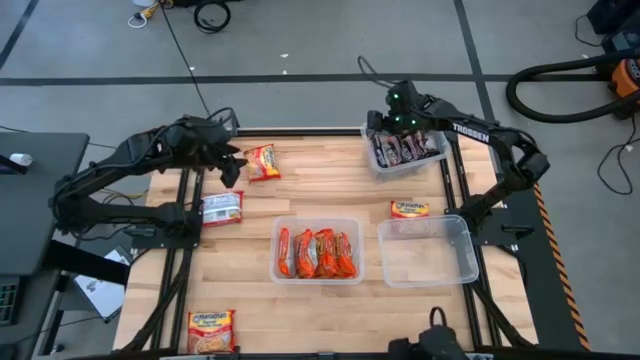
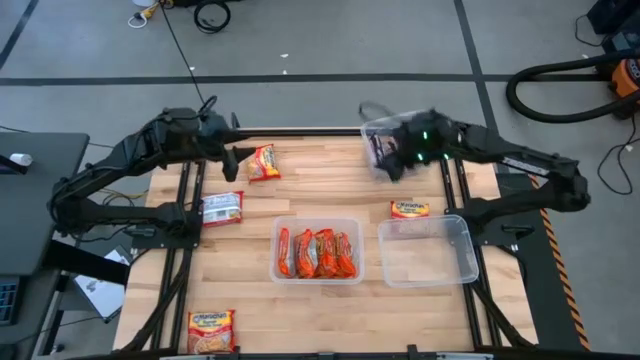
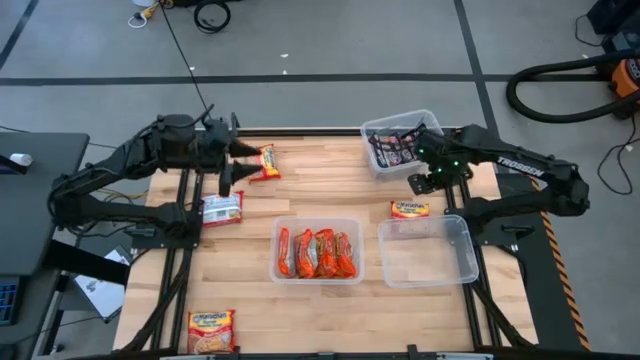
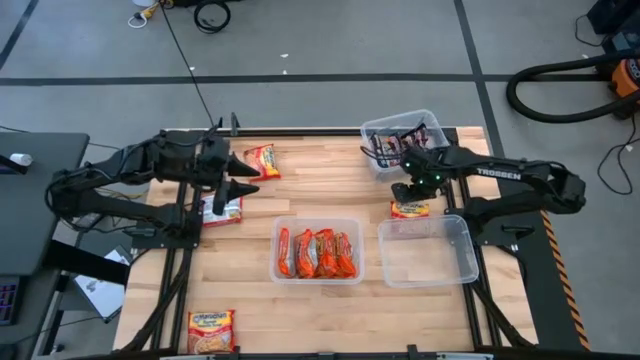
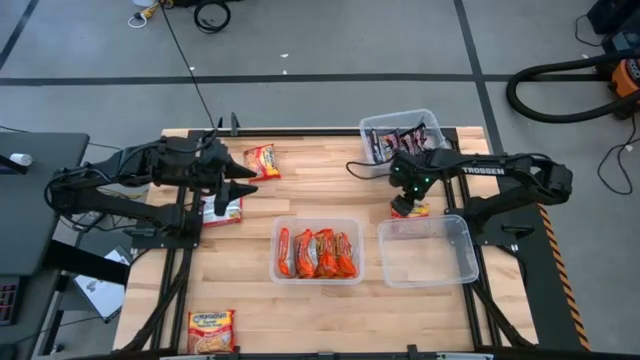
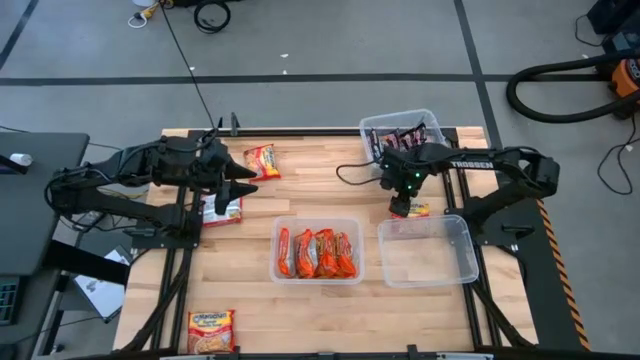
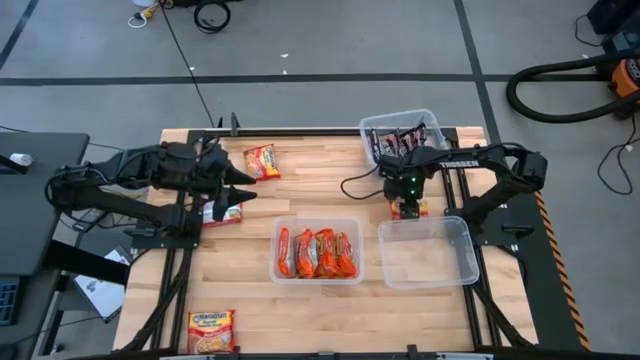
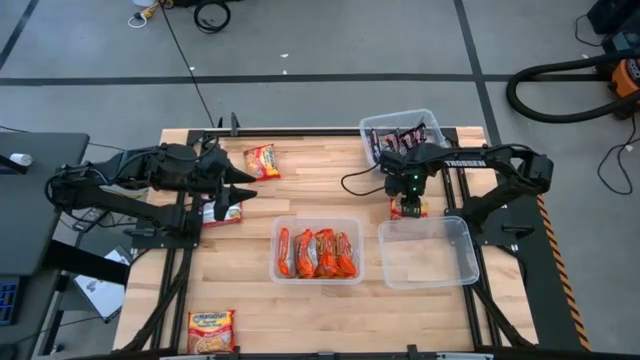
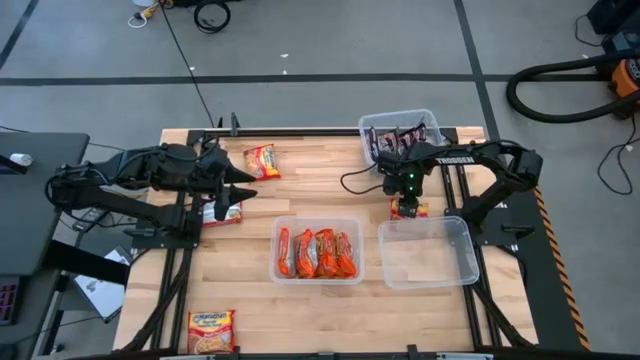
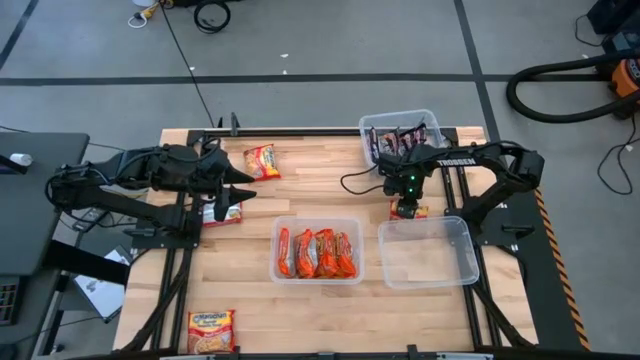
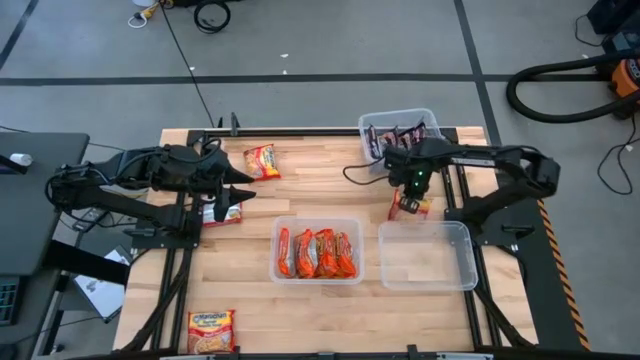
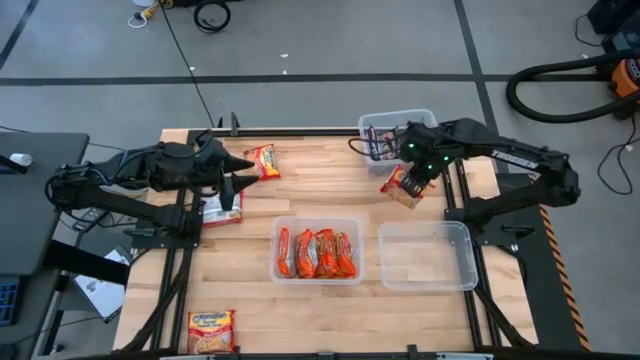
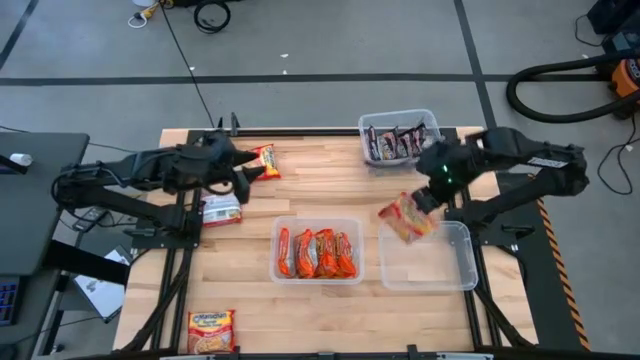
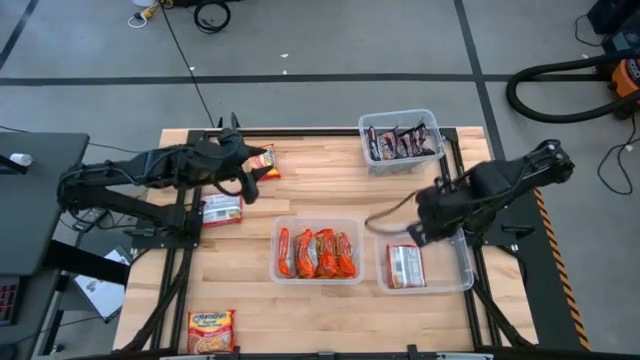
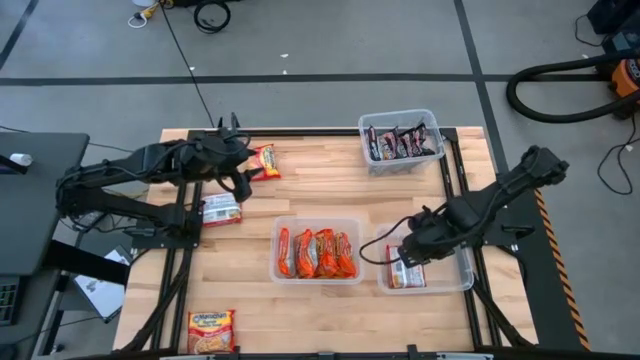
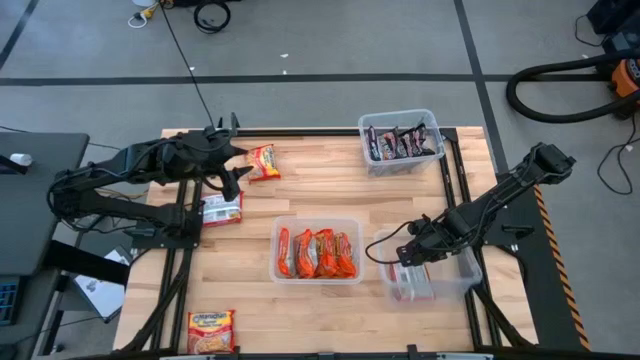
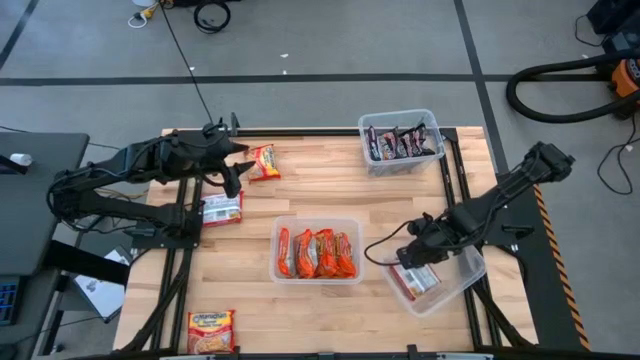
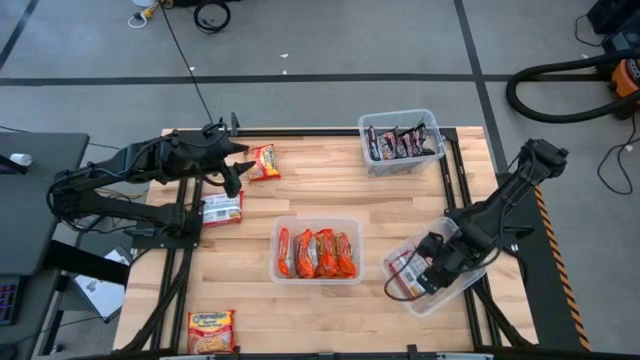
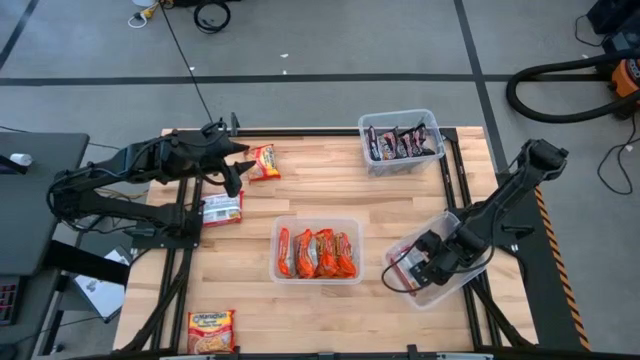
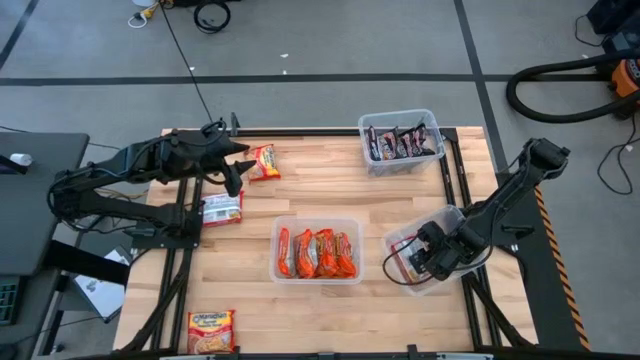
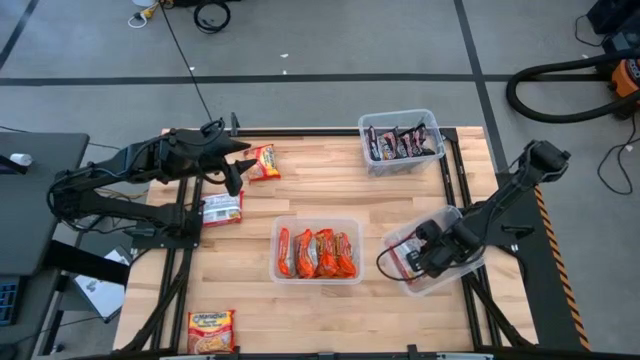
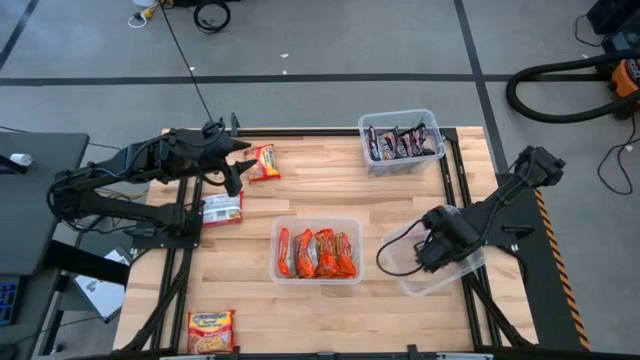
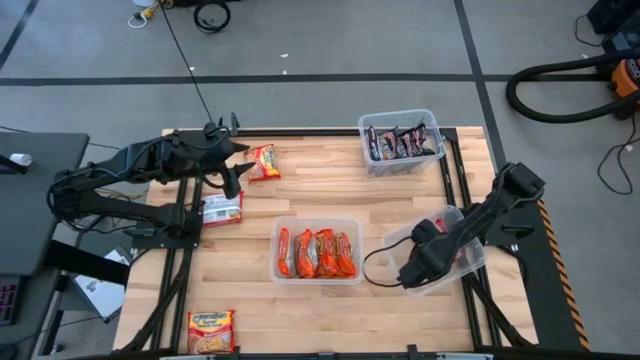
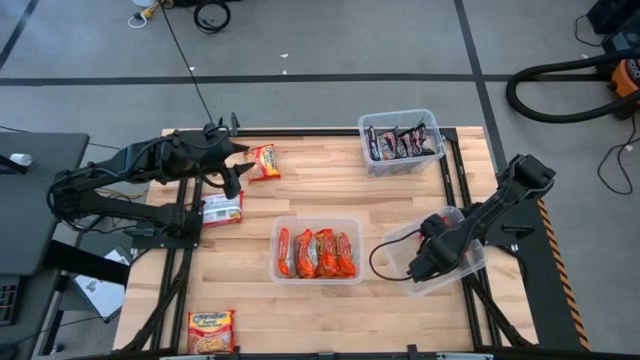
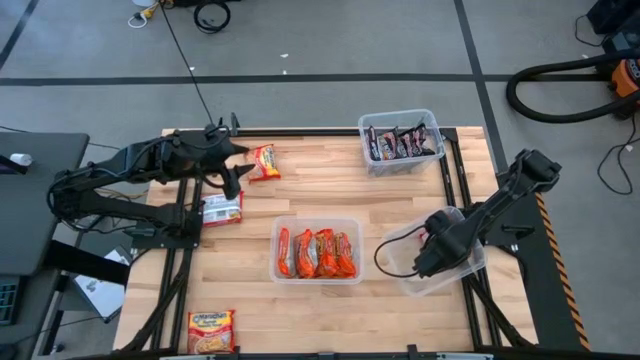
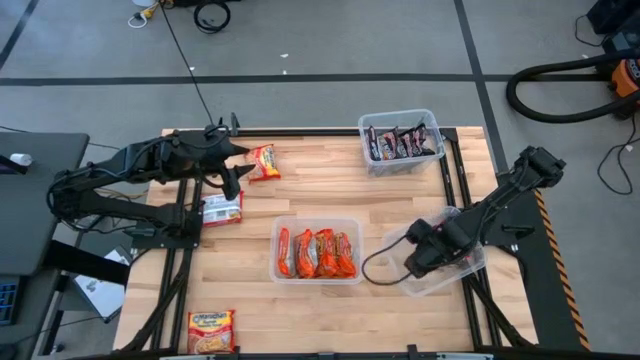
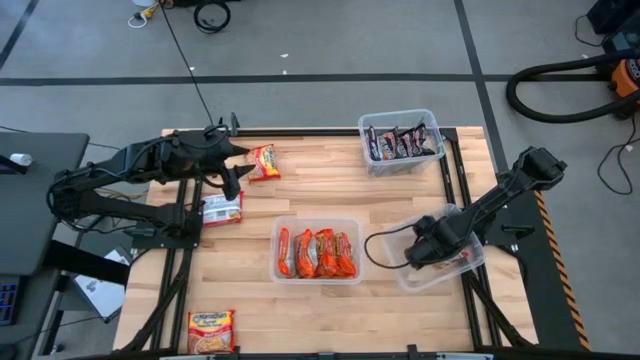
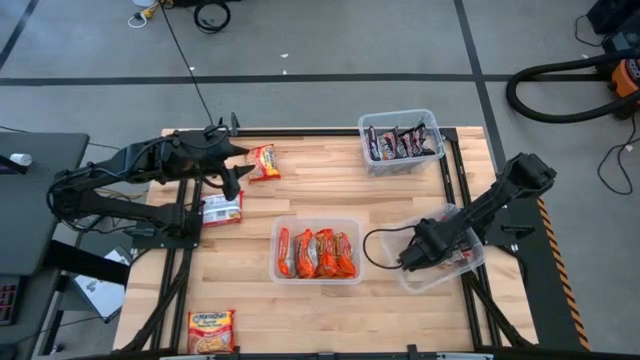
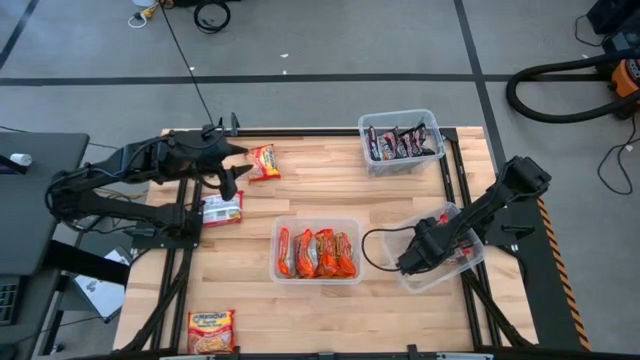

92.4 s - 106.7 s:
Task: Sort Maruchan noodles
Put the red noodle pack into the bottom right transparent bin

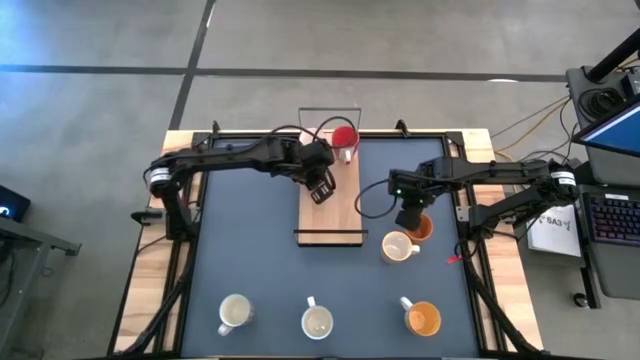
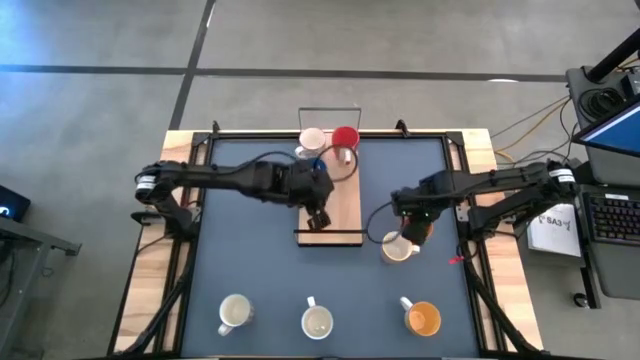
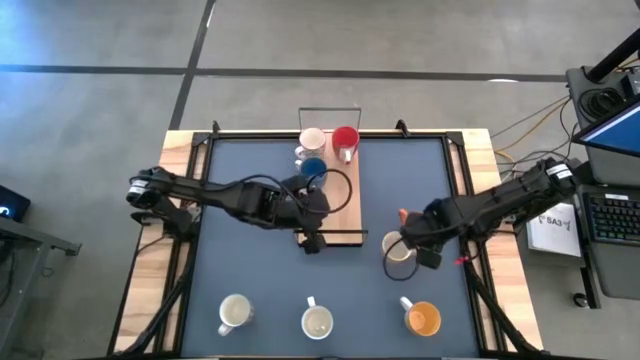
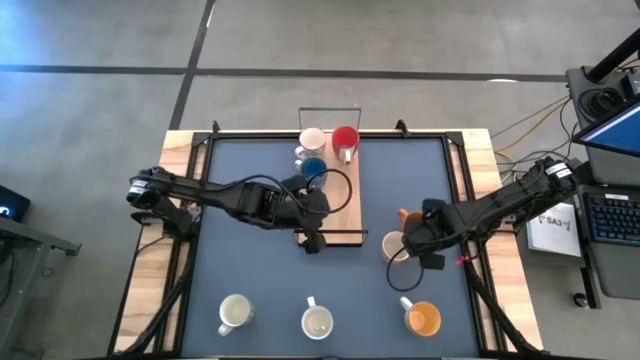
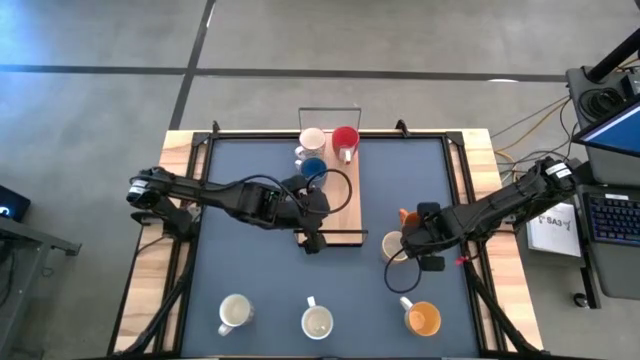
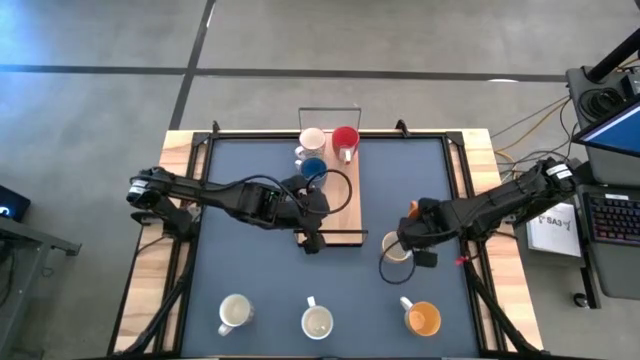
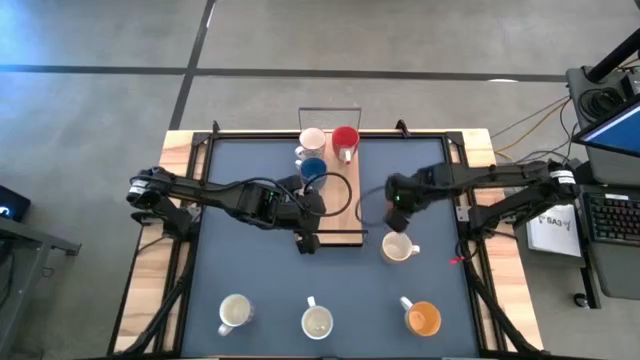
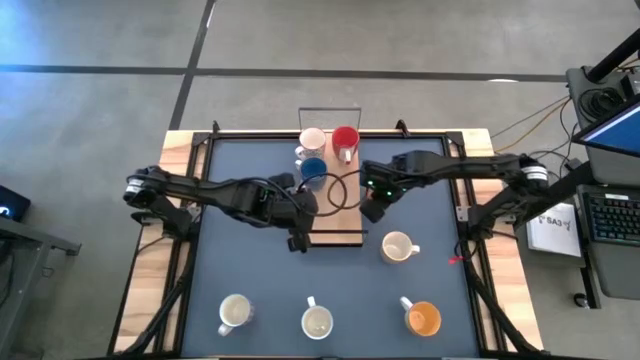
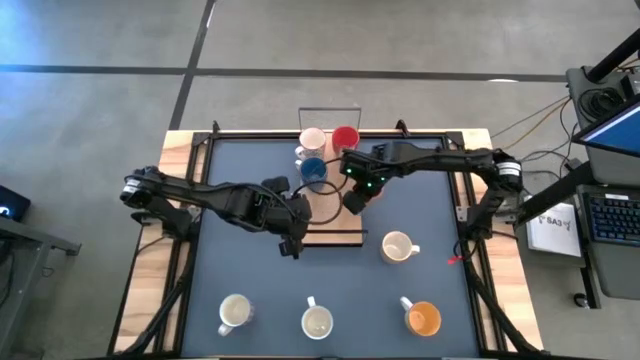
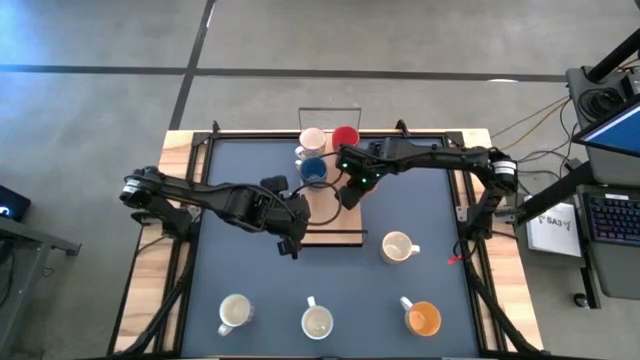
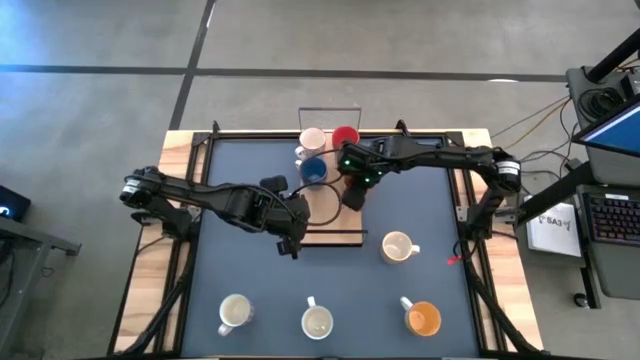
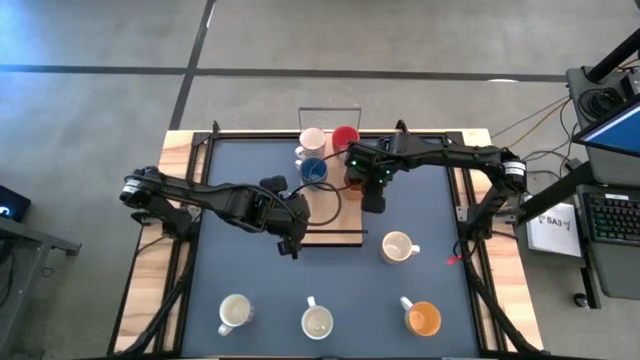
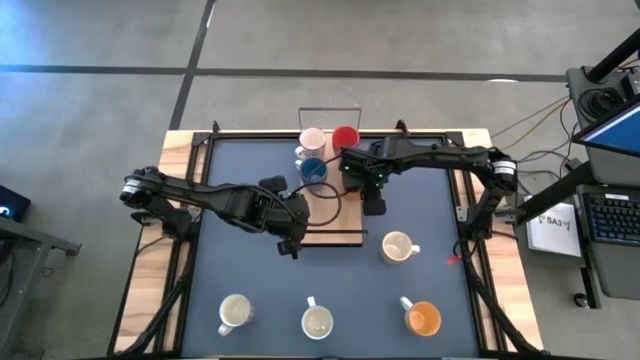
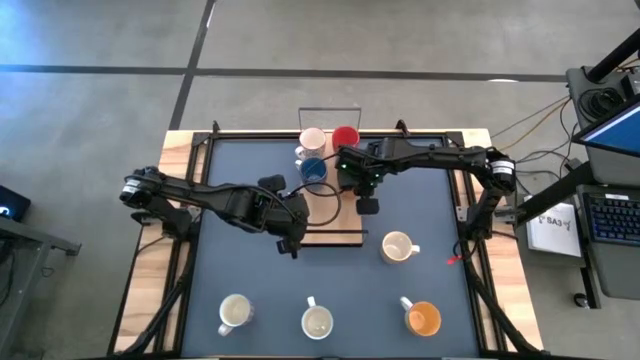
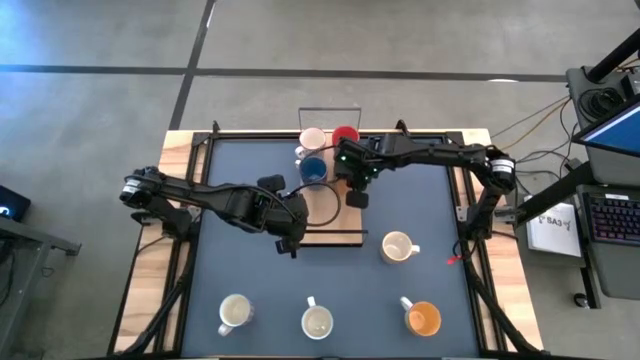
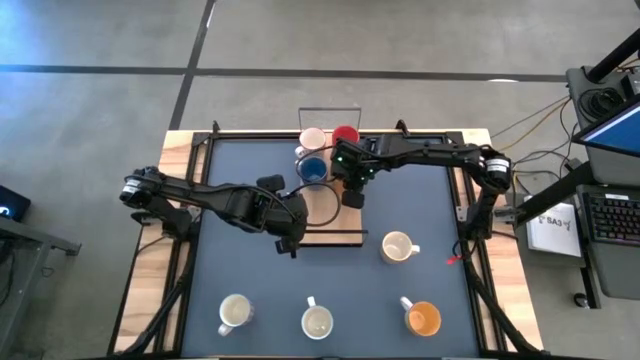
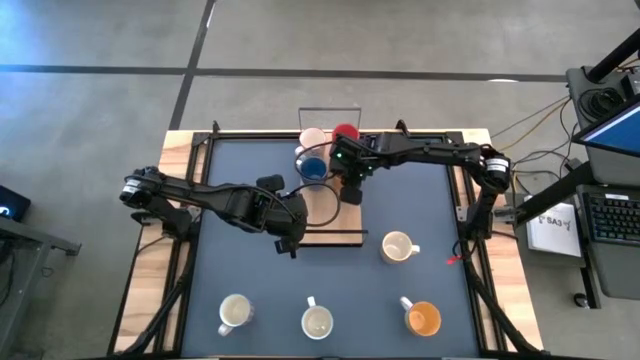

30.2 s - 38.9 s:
Task: Place coffee mugs
Put the orange mug on the shelf
